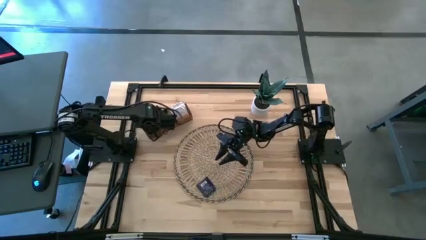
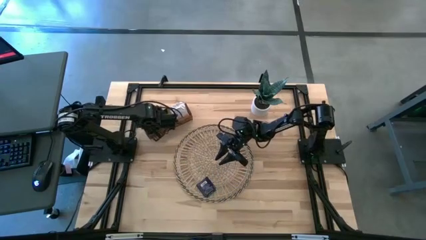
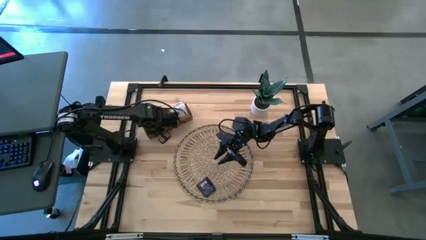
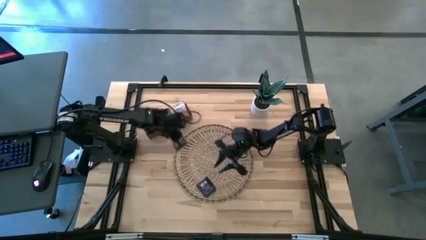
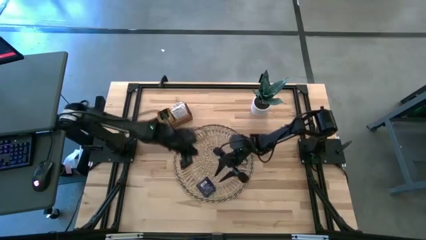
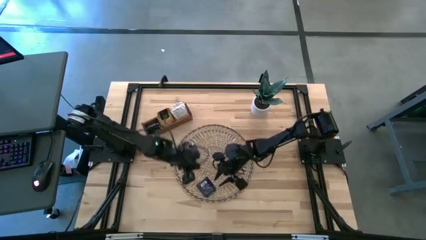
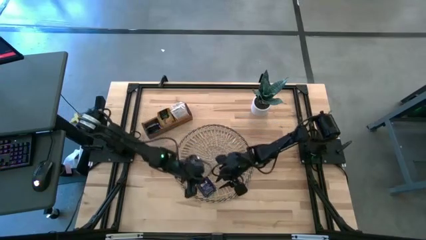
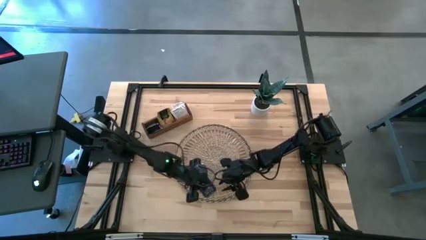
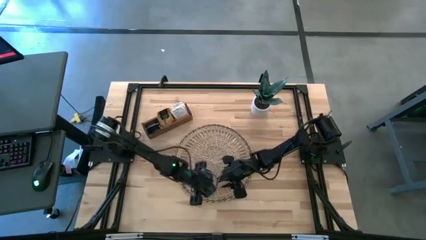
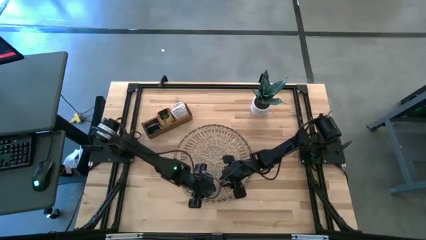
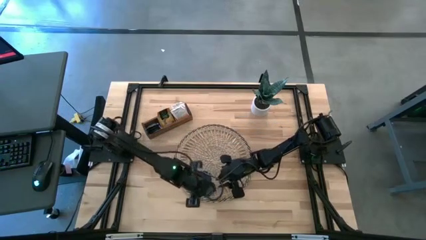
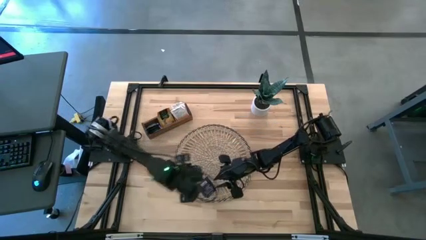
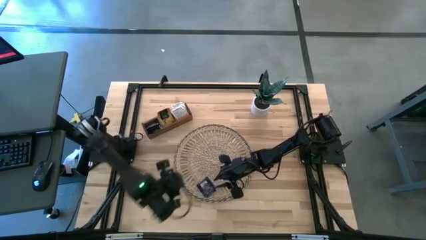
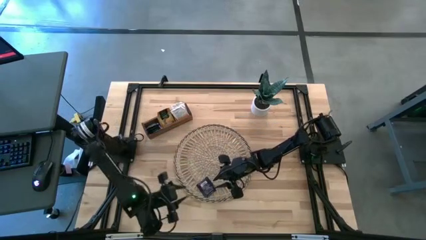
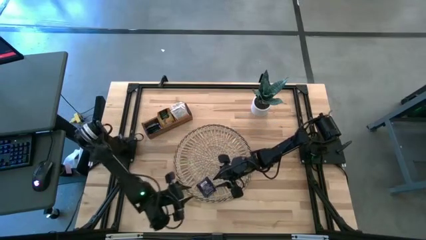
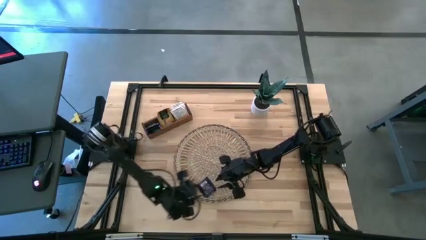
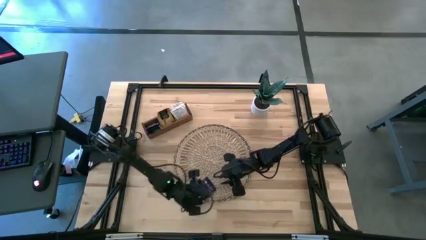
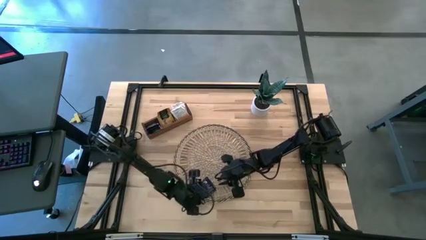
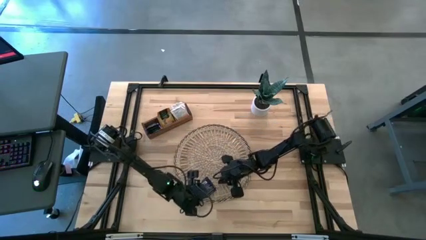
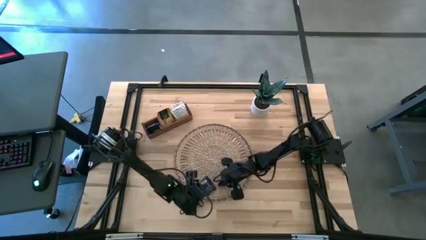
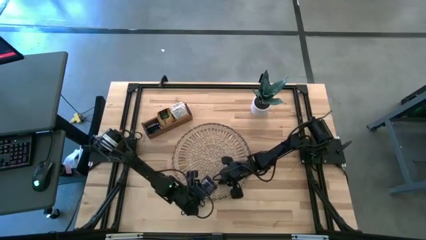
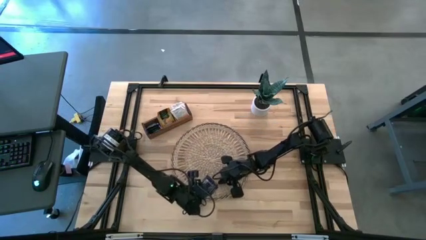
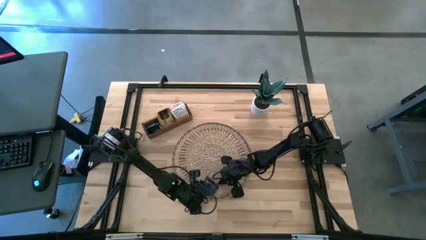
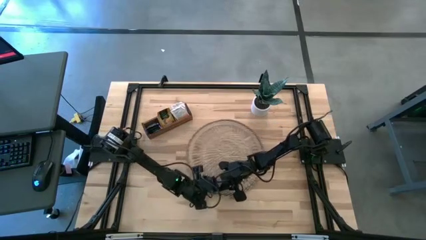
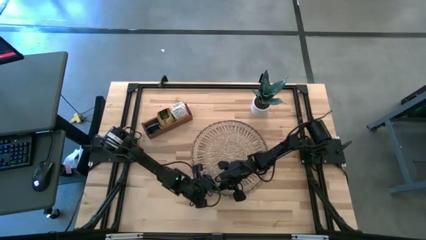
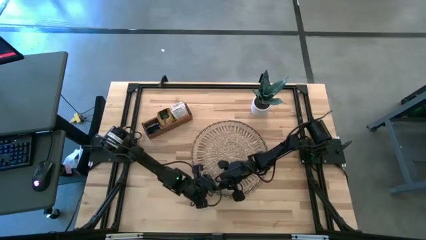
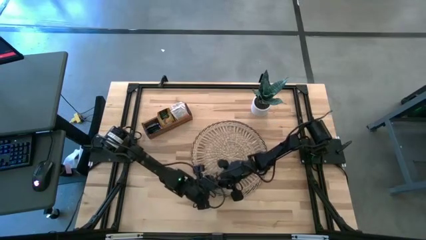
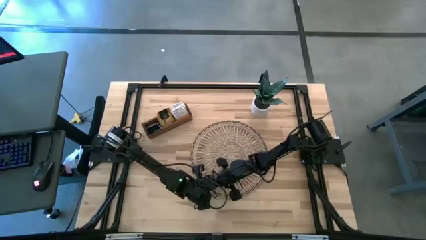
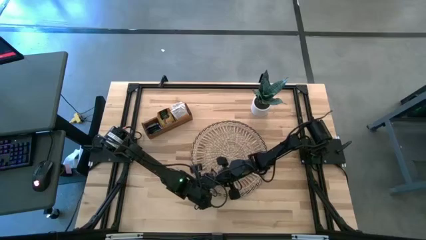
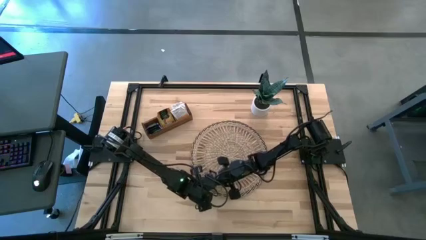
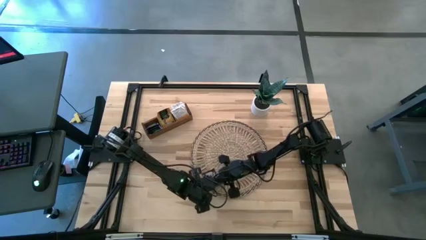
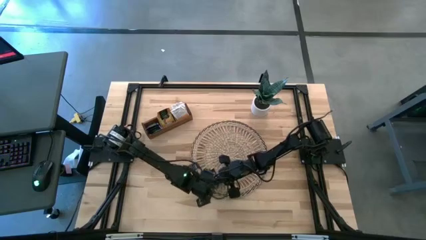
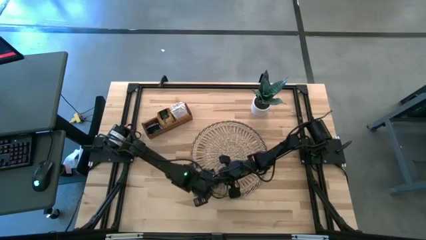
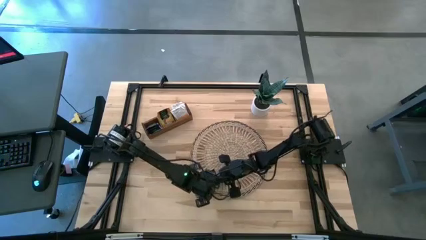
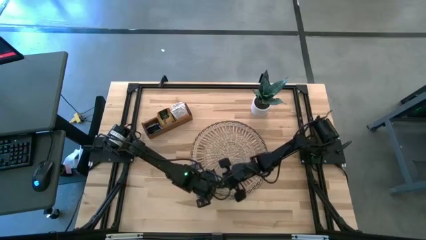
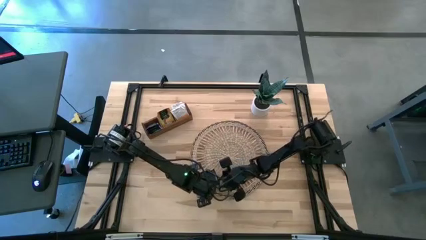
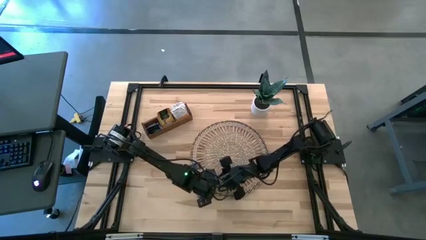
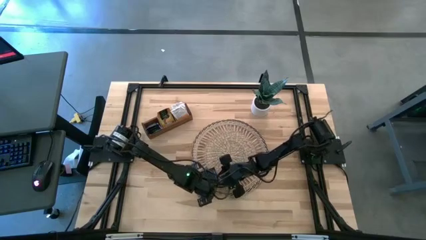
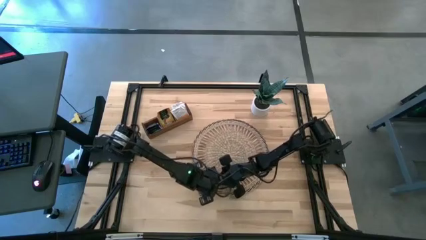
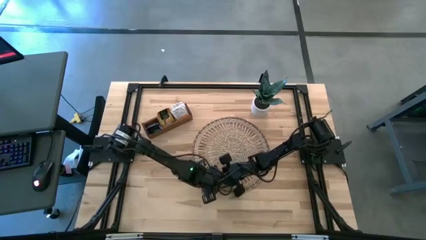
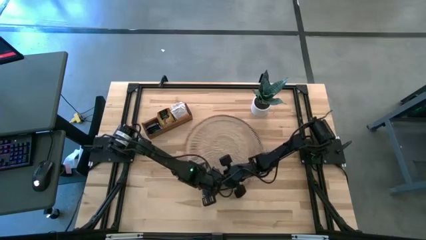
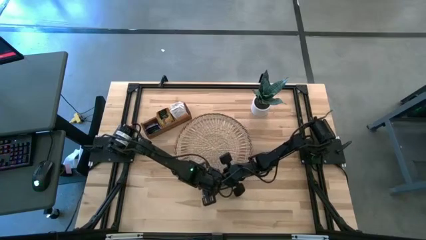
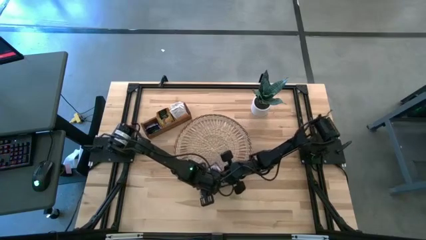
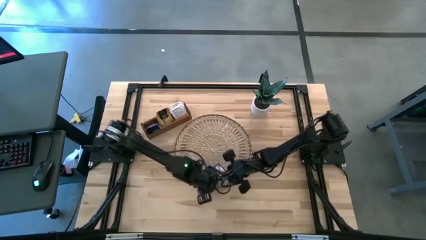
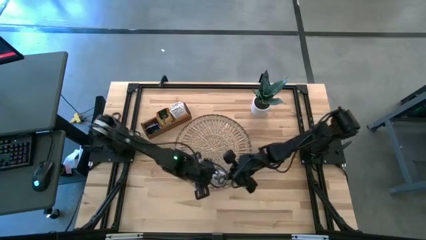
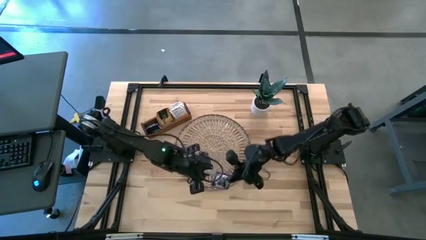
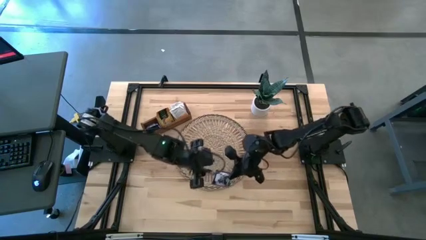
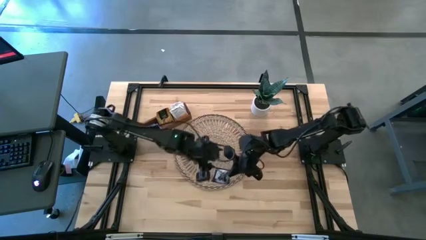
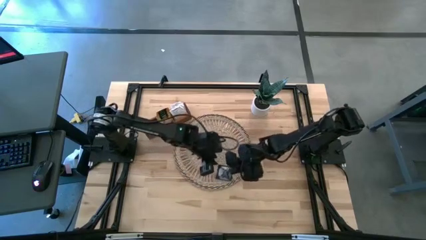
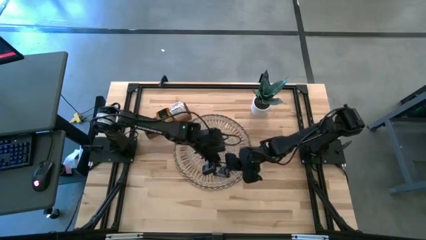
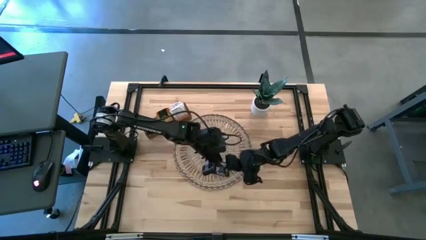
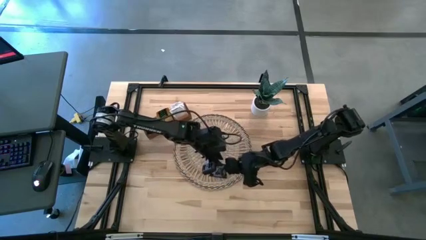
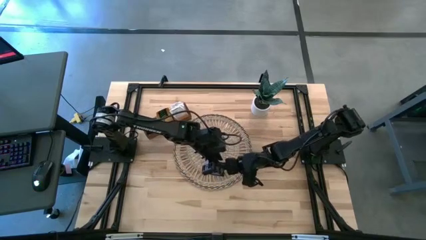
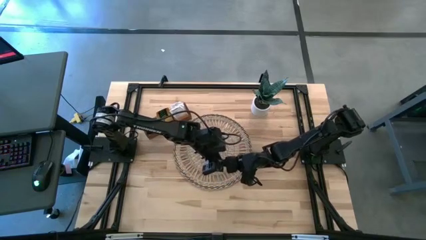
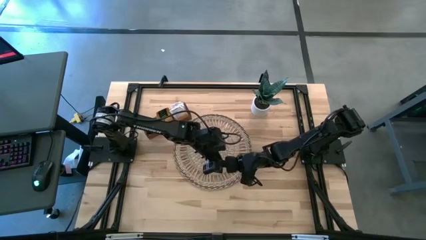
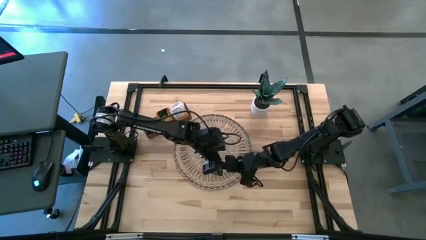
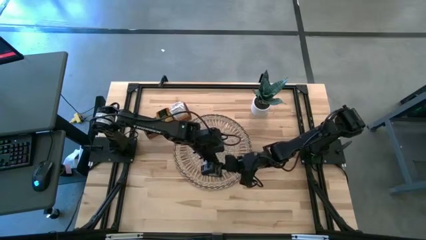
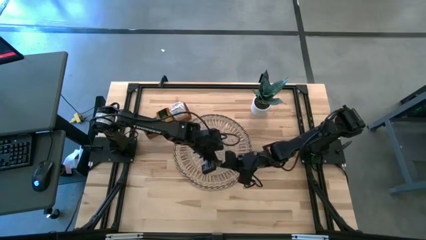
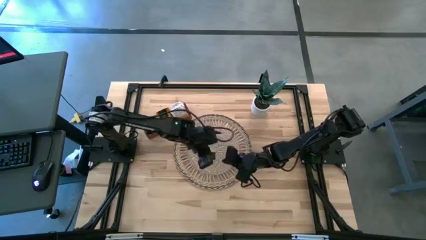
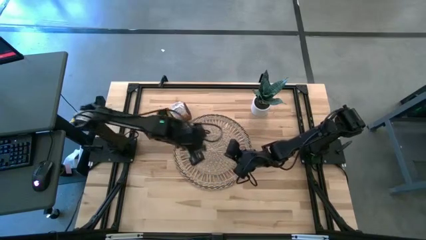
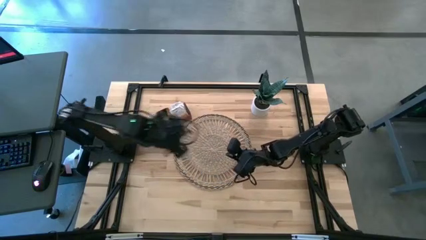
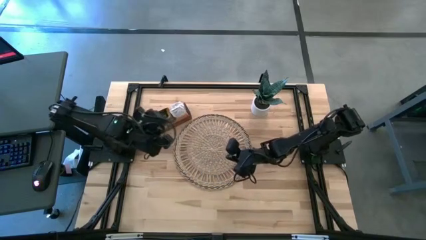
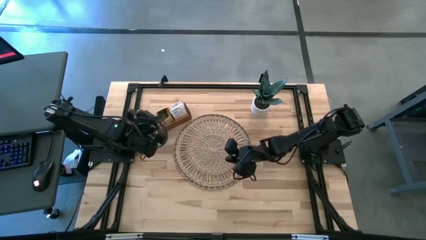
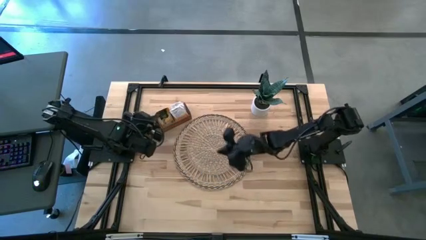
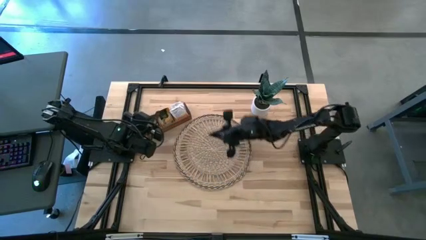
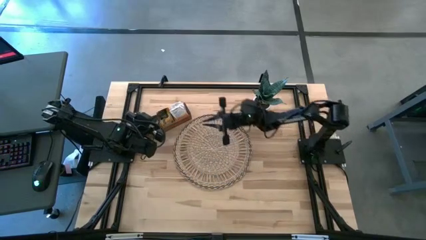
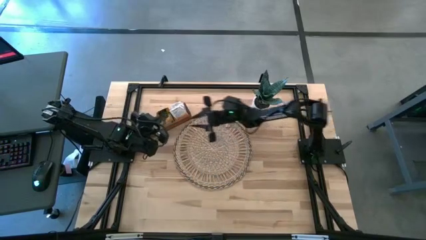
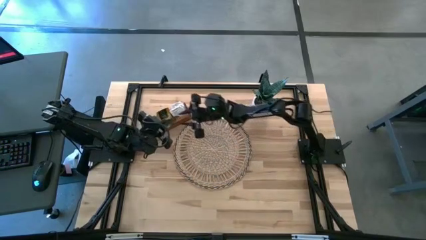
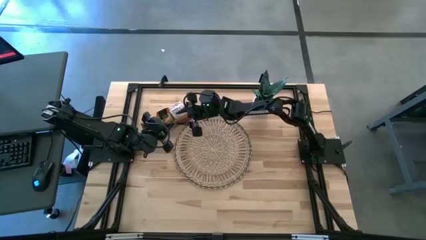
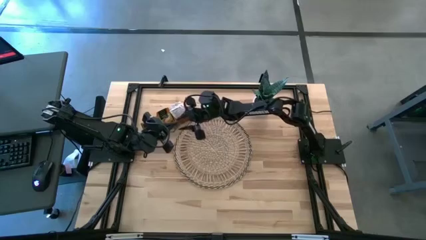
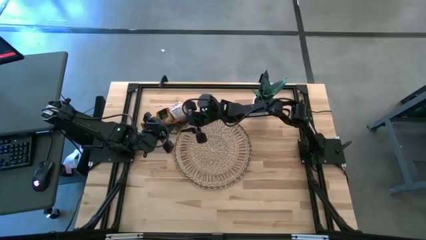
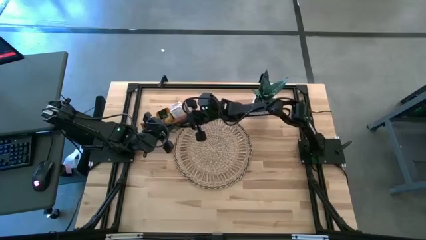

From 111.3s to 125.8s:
Task: Pick & Place Tea
Put the black tea bag into the left compartment of the wooden organizer

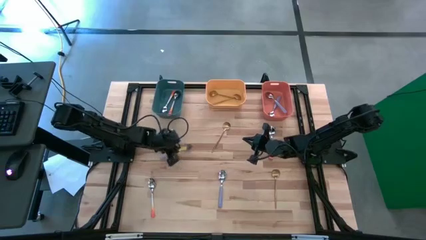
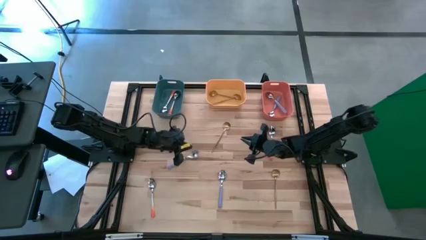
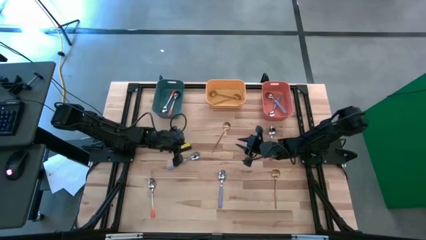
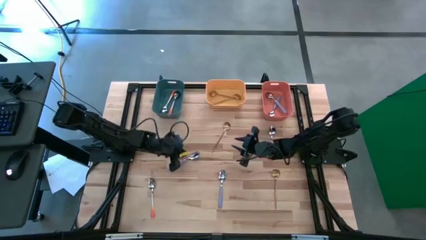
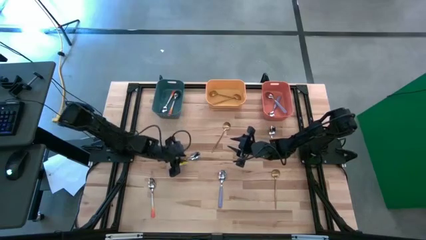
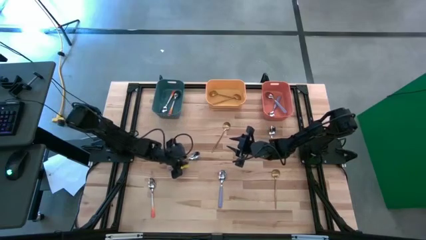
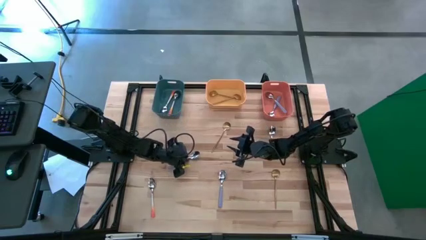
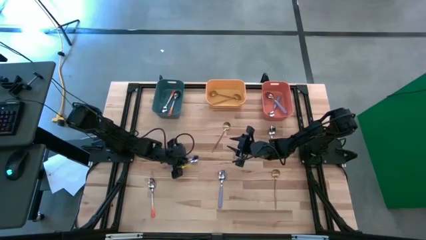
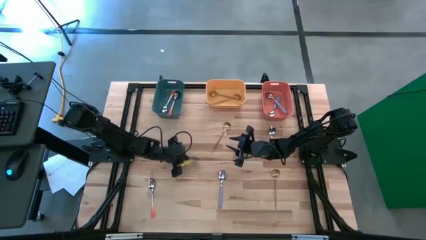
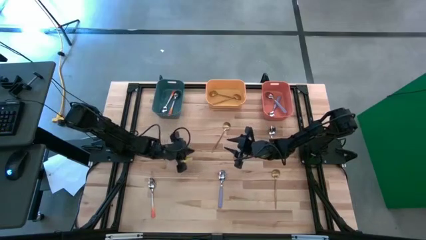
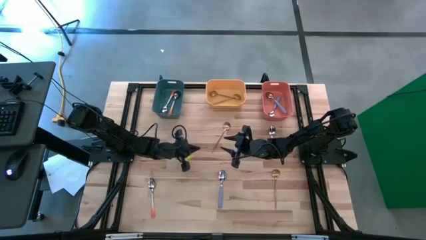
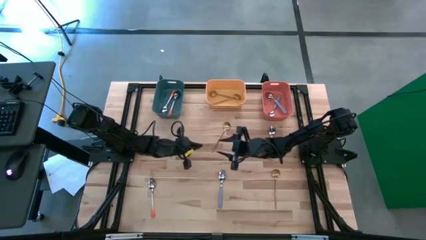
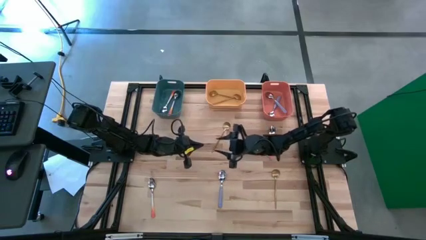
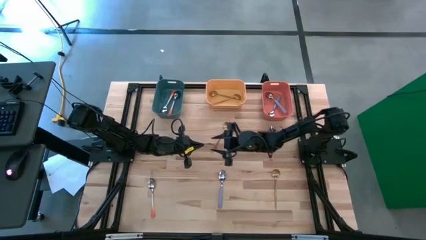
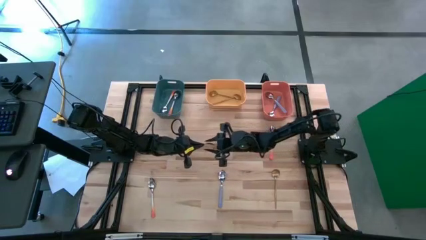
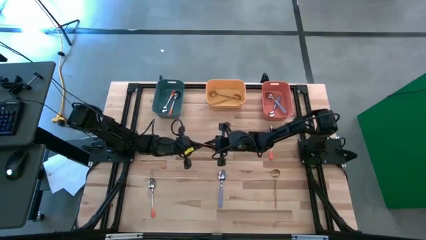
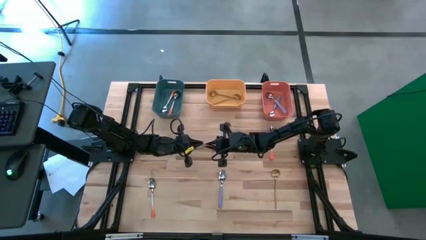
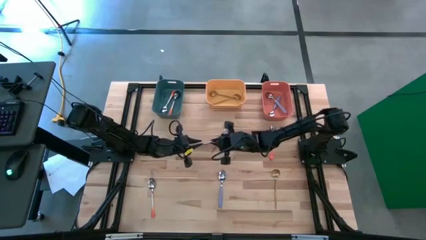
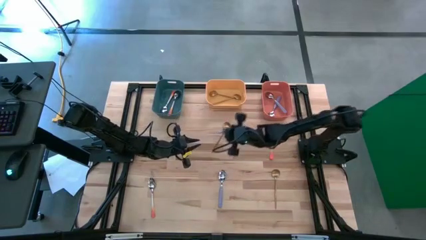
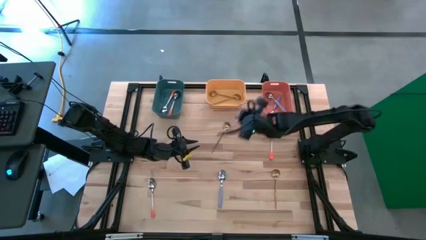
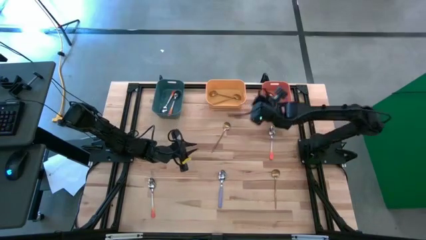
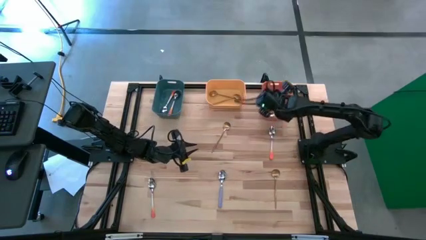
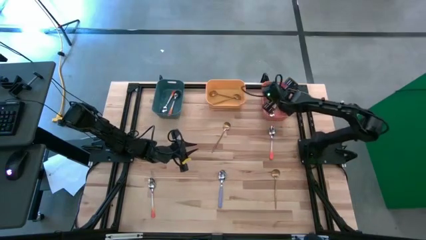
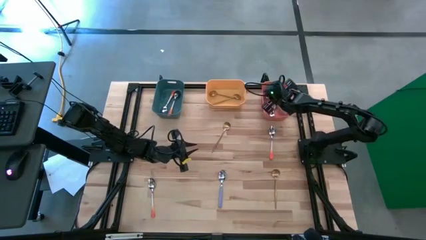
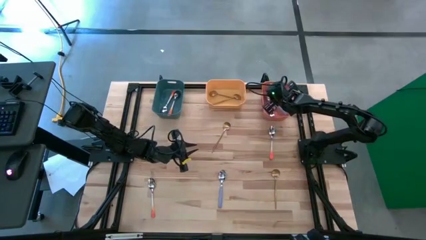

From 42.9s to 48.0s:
Task: Sort silverware by color (type)
Put the left purple spoon into the orange bin
